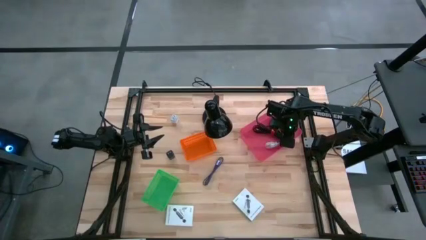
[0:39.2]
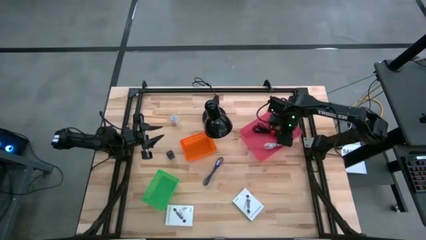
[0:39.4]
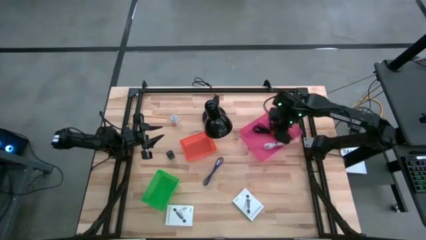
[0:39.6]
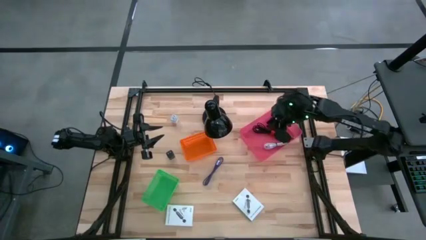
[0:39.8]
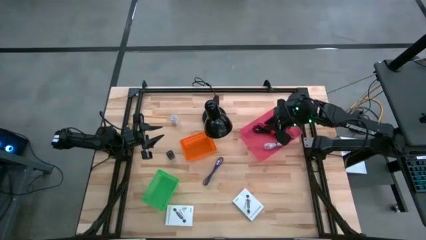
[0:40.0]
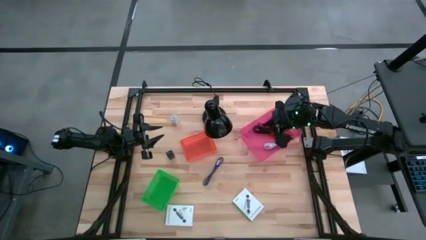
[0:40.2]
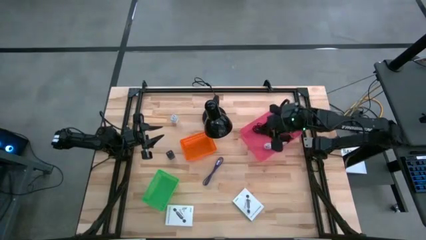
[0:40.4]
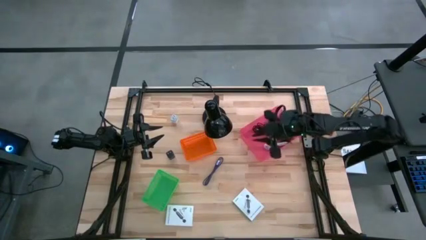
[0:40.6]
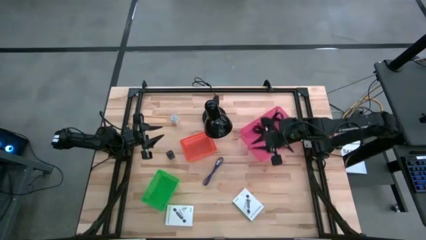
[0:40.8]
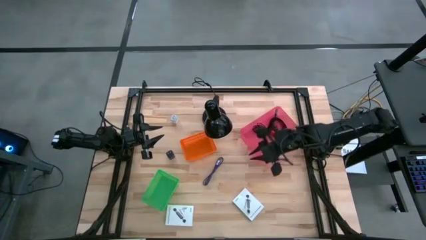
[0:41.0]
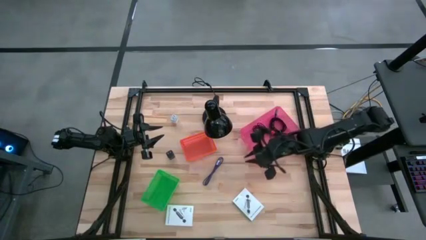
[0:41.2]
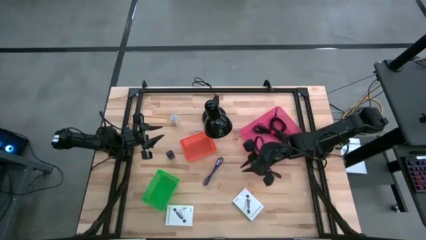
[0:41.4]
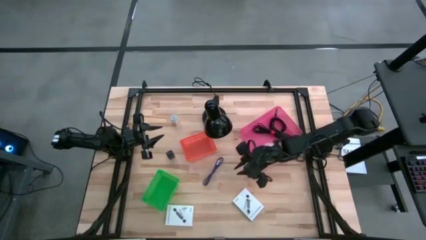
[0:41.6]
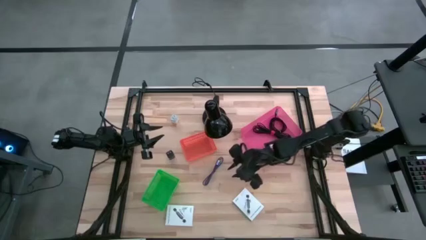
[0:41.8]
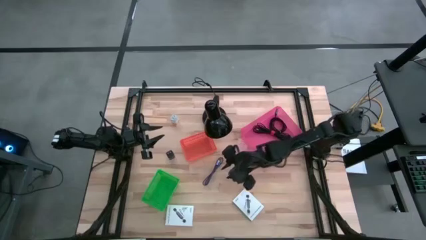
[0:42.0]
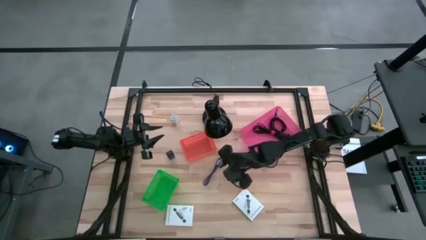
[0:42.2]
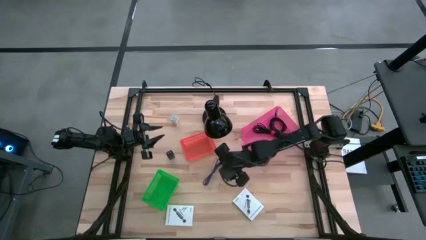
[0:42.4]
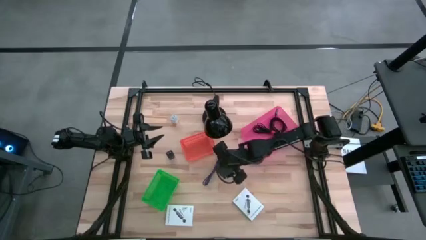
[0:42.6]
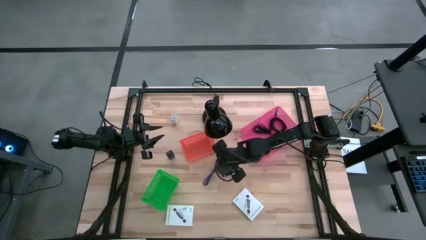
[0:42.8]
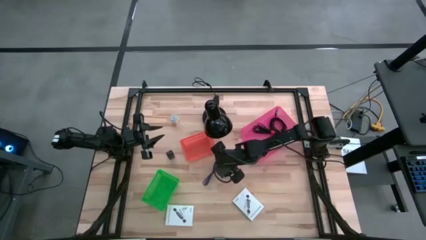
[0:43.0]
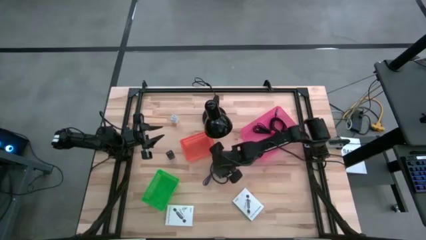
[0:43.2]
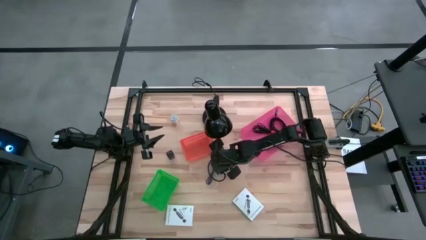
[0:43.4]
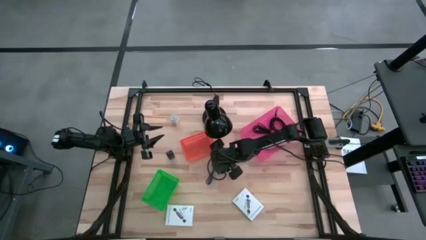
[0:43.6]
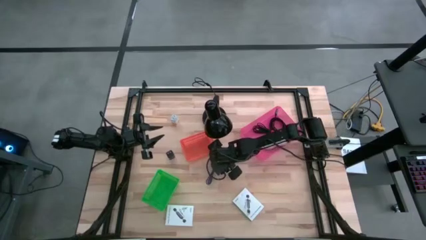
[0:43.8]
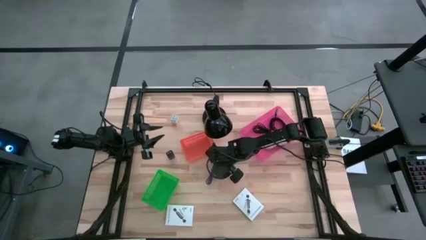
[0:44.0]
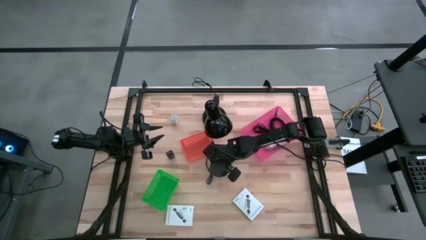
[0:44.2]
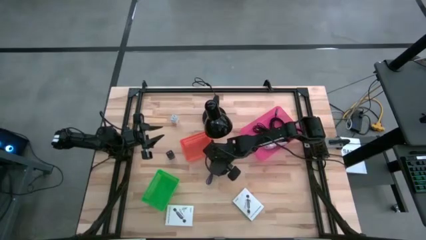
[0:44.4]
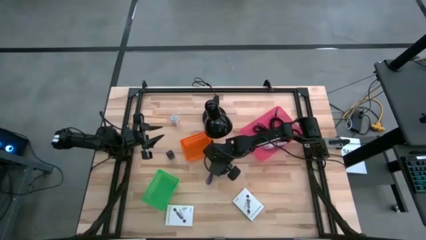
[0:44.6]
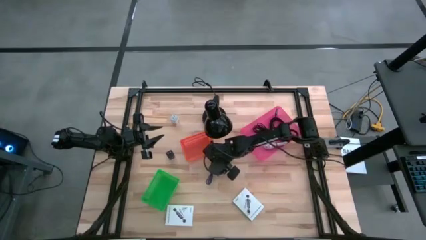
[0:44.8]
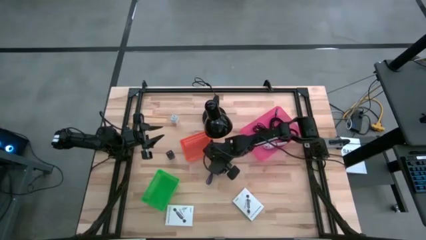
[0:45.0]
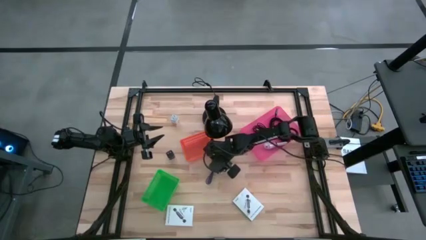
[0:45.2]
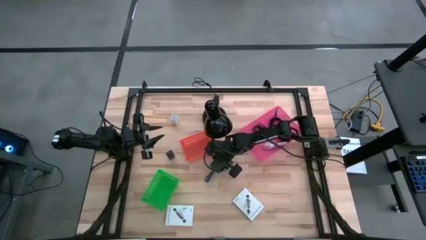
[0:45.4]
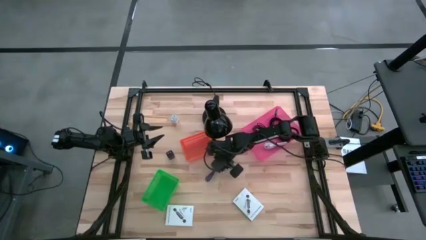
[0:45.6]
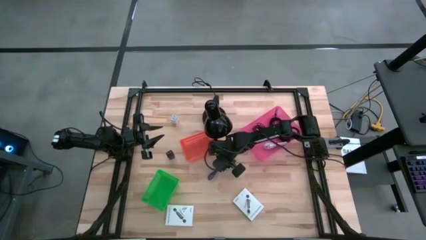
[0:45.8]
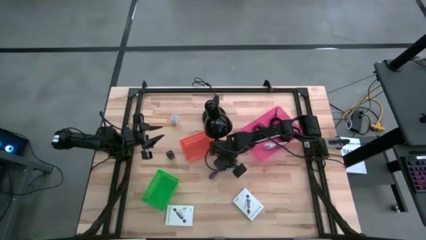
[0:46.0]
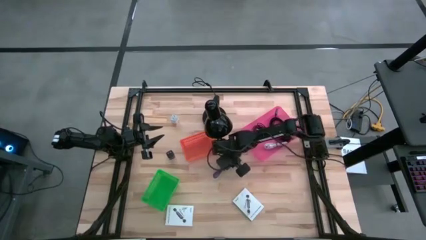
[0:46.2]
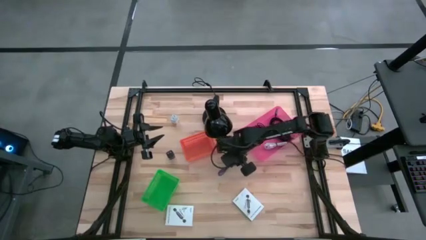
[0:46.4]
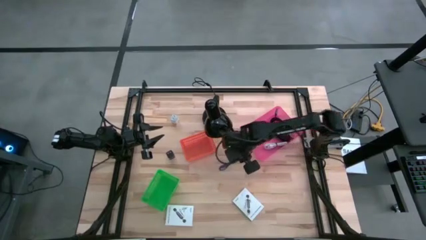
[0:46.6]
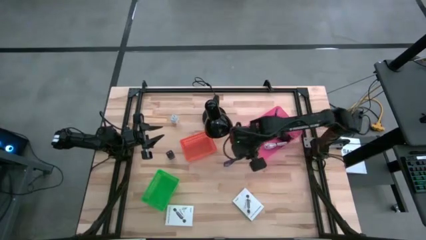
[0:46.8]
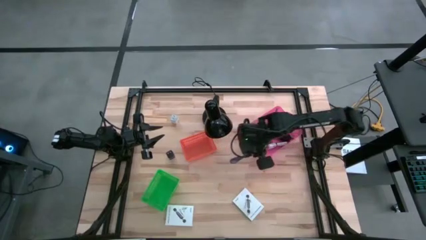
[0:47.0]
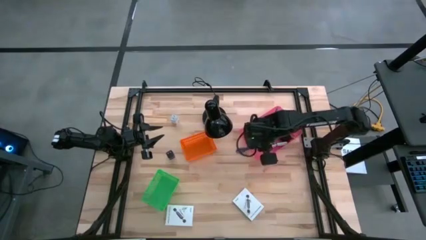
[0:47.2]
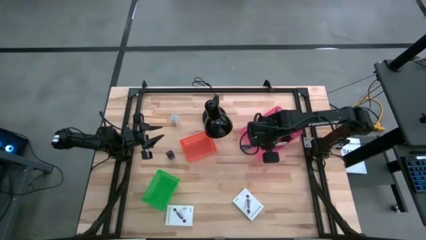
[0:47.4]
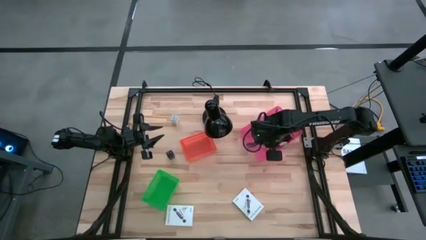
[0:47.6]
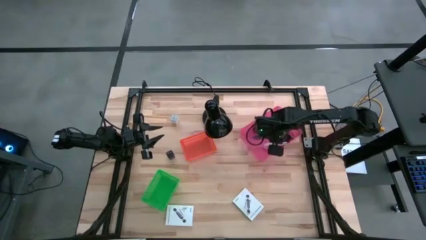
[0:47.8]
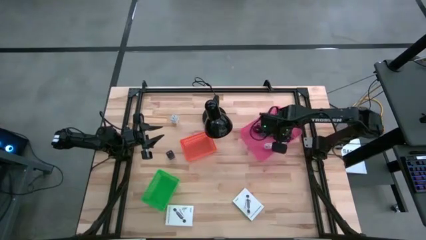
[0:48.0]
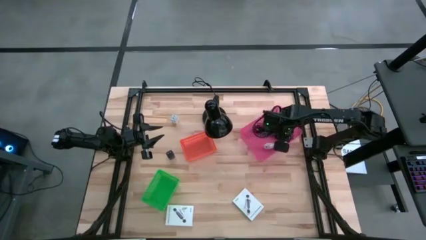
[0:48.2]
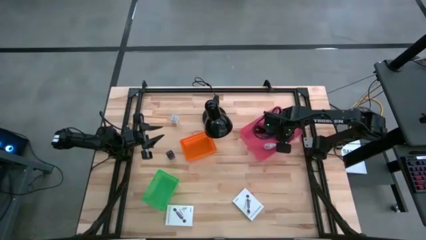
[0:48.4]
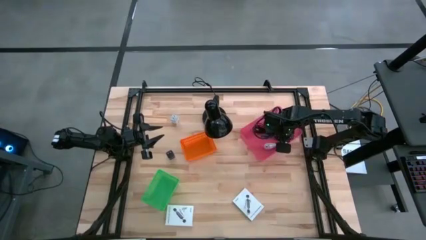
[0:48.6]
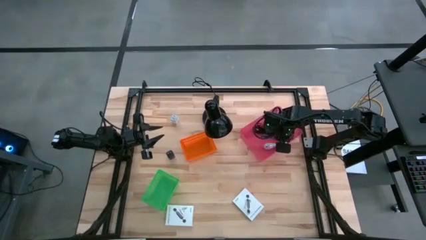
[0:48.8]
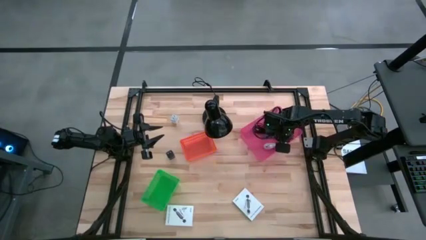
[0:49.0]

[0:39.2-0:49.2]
Task: Pick and place items into bin
Put the blue charger cable into the pink bin

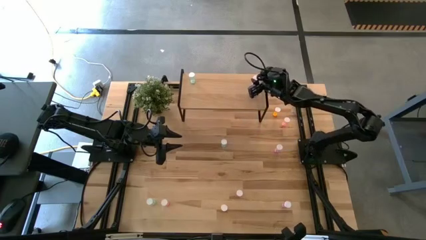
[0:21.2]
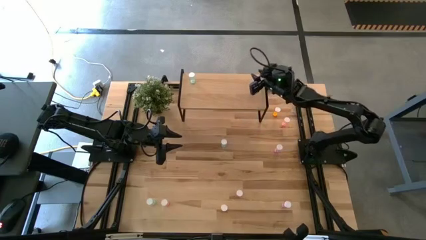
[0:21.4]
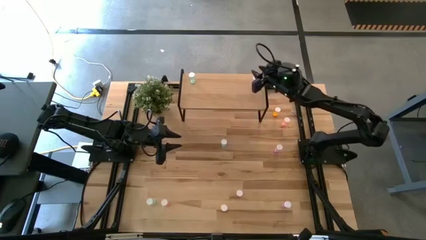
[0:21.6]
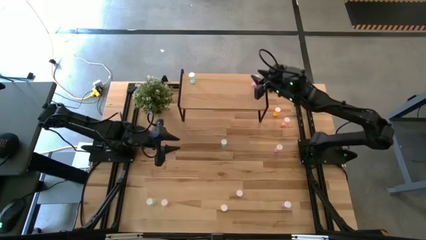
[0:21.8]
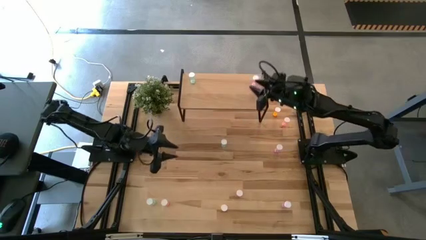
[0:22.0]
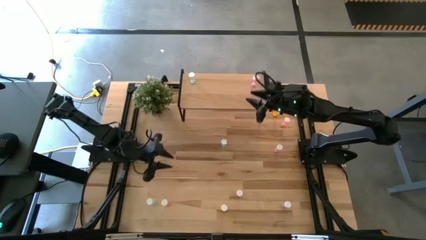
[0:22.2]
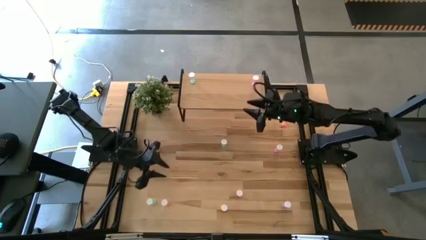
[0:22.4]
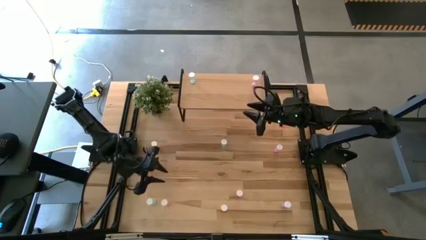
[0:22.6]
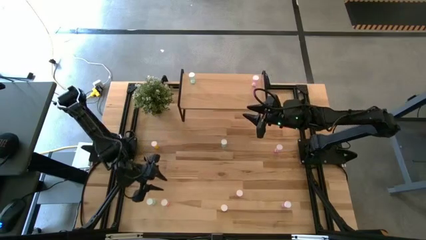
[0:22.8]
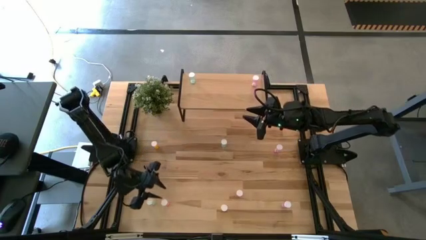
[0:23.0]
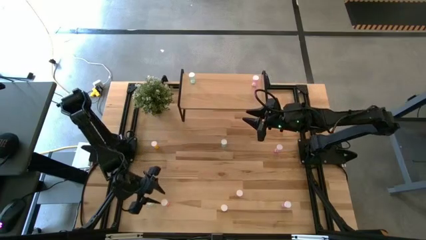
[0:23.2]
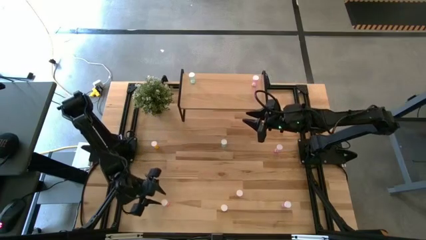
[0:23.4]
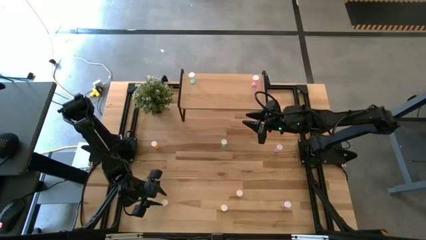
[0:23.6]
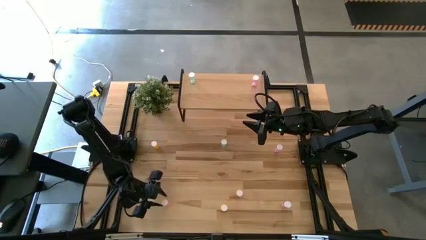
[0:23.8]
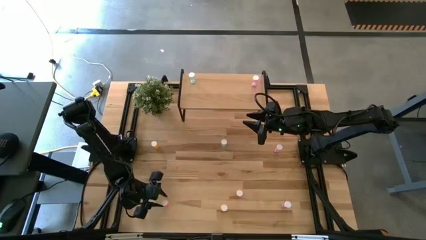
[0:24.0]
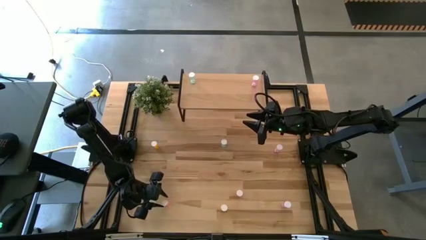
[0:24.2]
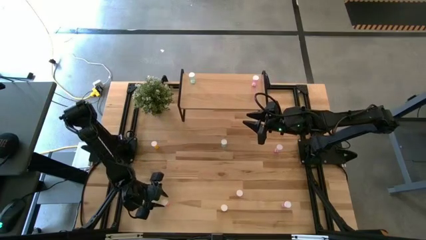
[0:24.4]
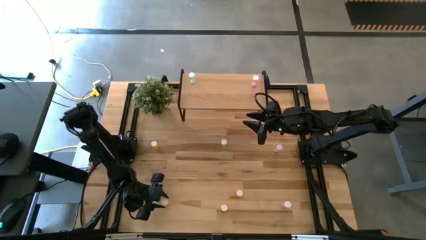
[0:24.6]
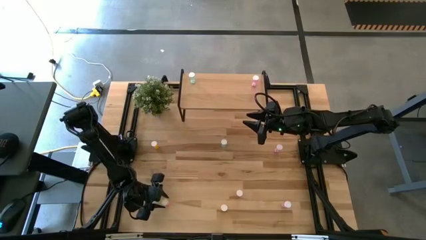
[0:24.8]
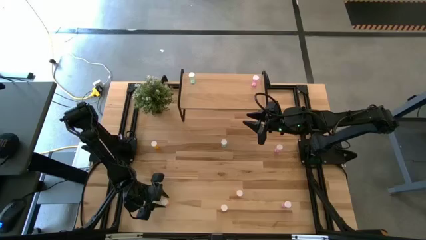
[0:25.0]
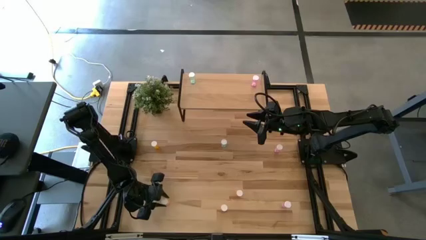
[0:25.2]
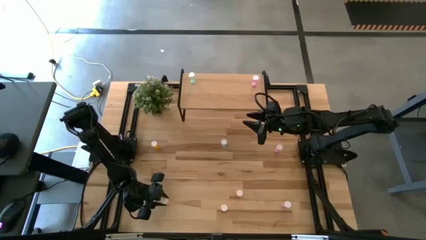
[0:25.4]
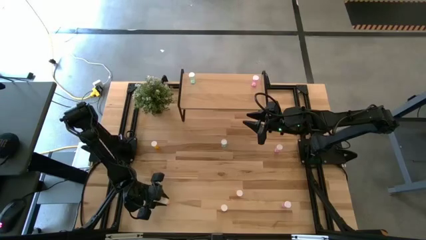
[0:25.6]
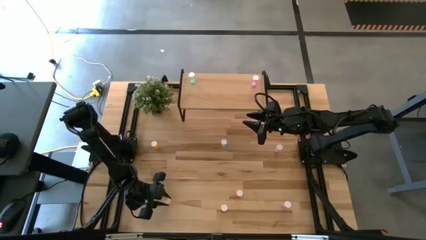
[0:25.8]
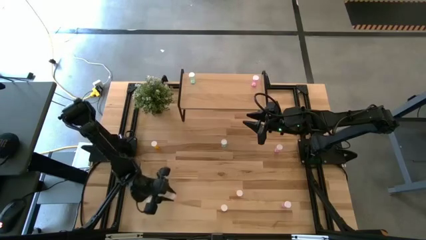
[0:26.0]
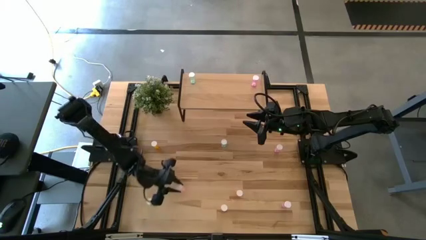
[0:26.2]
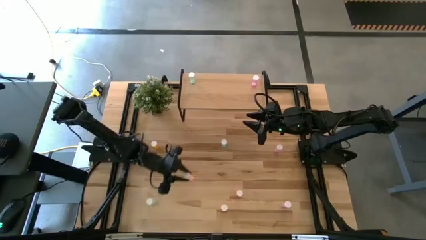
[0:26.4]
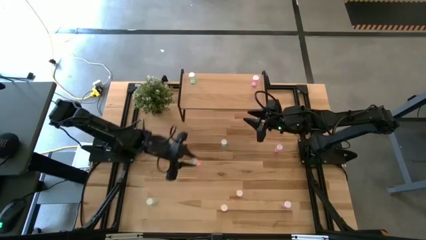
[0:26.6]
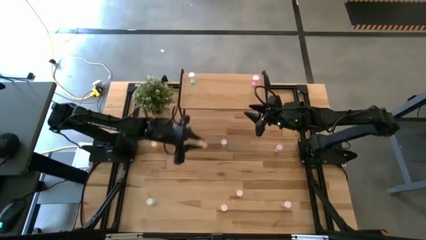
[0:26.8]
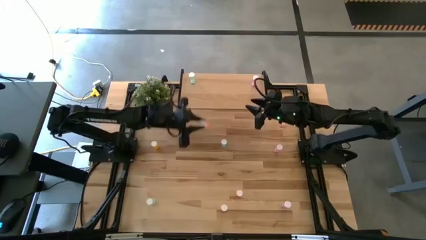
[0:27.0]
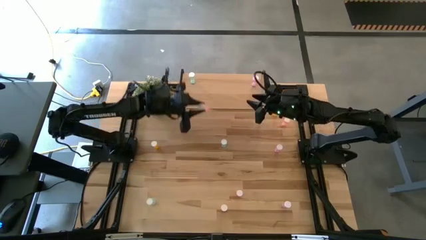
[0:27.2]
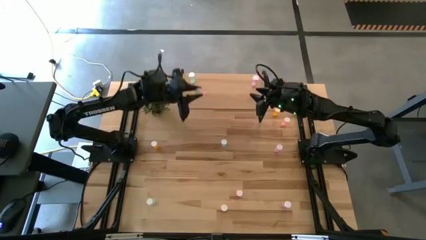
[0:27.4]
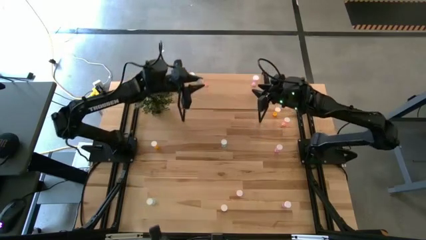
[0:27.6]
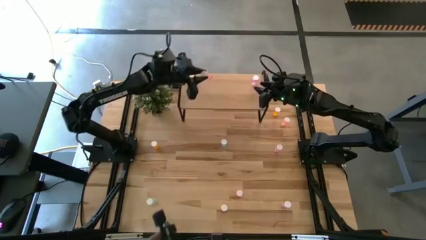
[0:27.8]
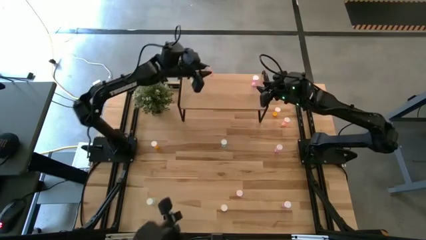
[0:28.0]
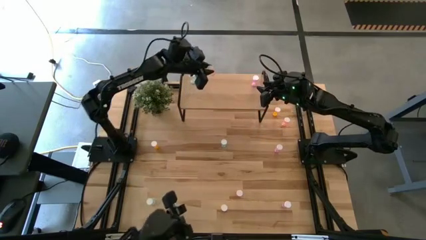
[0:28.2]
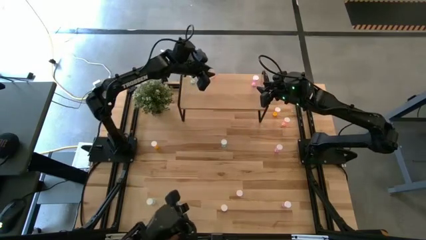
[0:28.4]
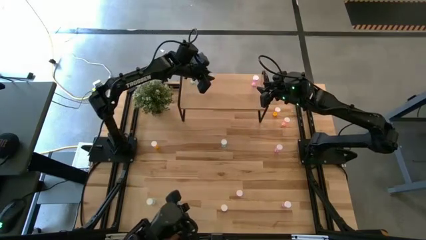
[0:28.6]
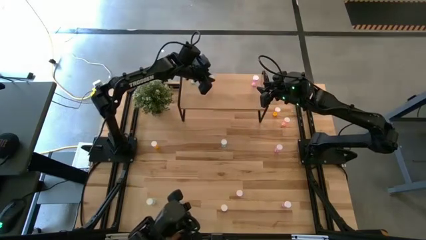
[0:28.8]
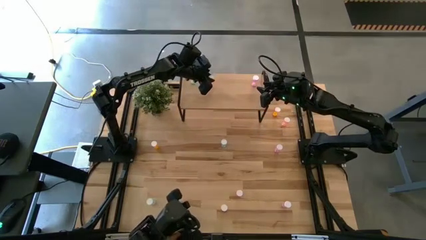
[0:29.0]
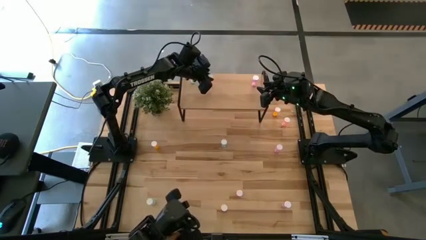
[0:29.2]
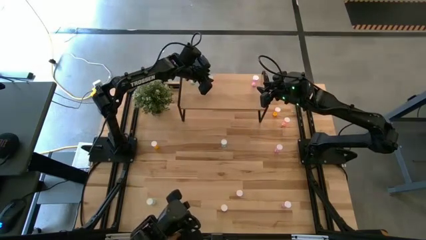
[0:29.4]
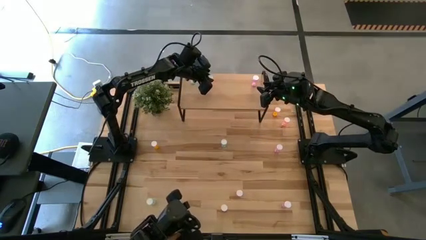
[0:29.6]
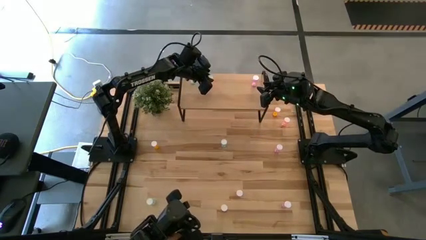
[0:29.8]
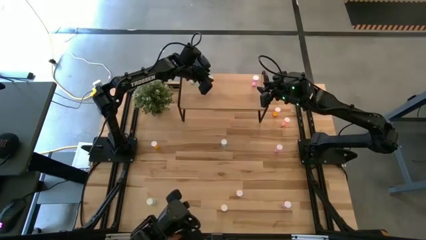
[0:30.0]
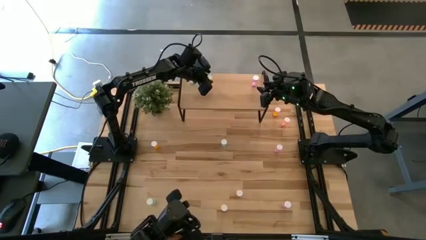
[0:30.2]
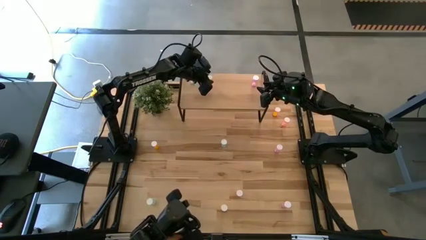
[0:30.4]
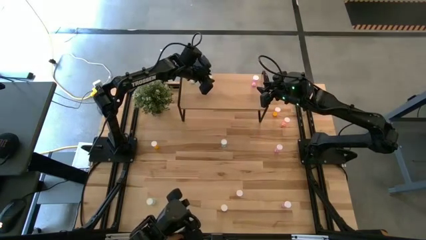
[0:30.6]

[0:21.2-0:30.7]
Task: Pick and place medicine bottles onto shelf by color
Put the bottom left pink pill bottle on the shelf
